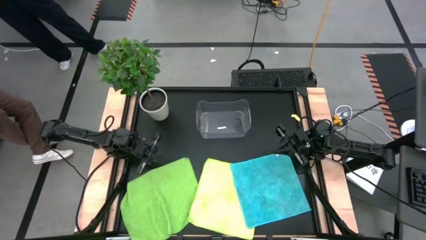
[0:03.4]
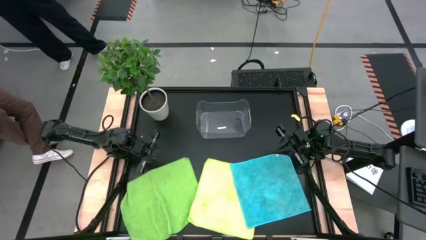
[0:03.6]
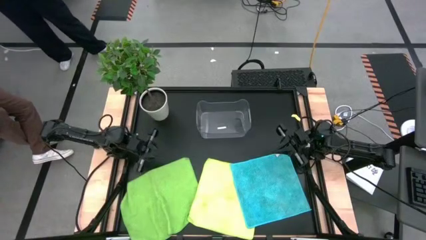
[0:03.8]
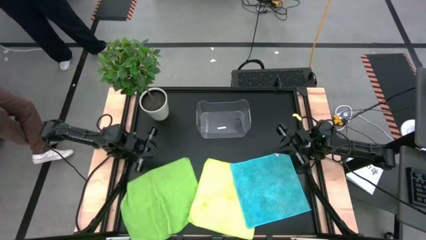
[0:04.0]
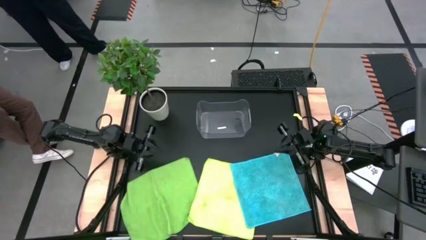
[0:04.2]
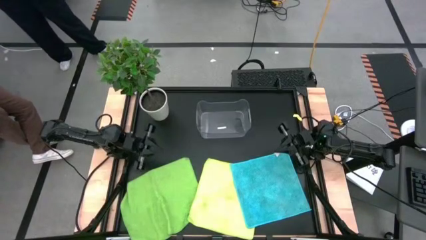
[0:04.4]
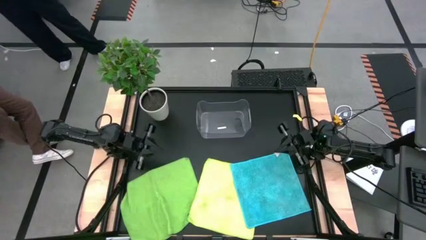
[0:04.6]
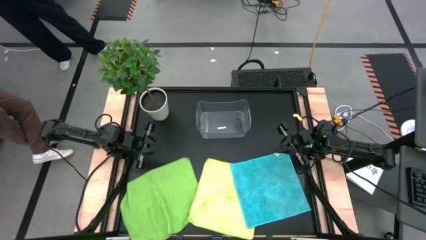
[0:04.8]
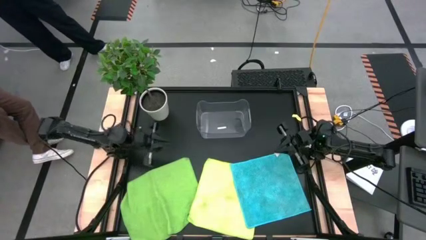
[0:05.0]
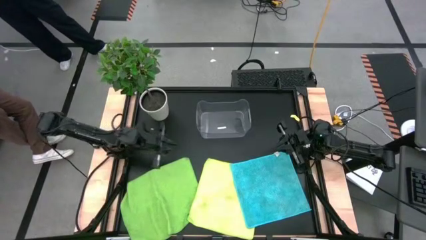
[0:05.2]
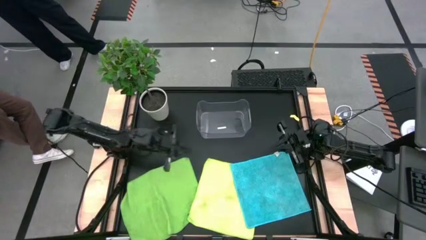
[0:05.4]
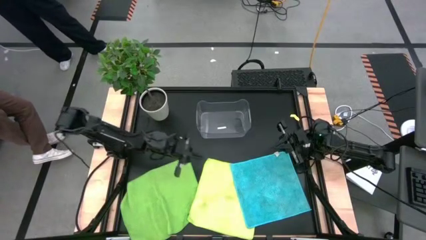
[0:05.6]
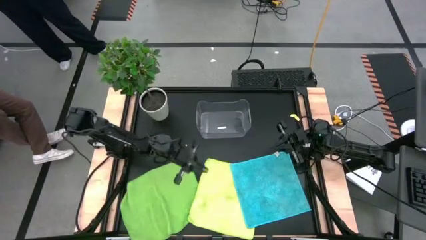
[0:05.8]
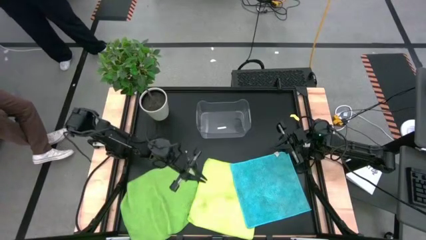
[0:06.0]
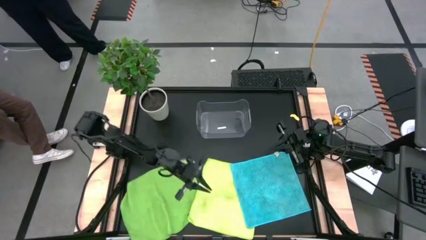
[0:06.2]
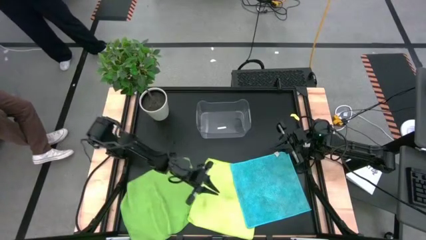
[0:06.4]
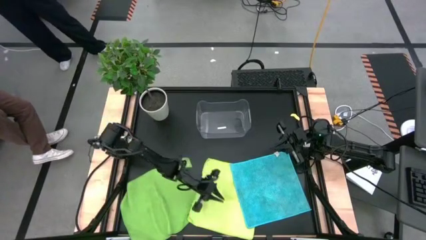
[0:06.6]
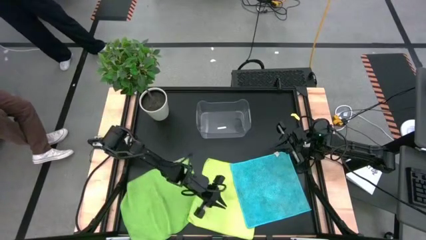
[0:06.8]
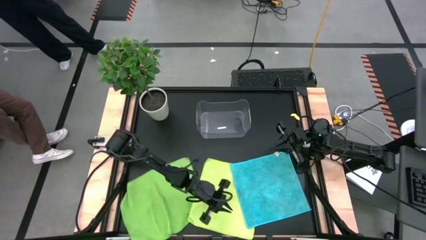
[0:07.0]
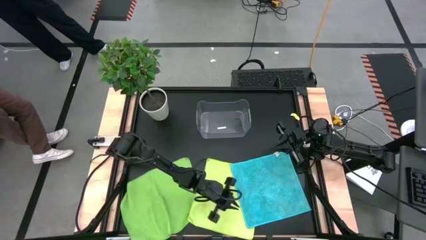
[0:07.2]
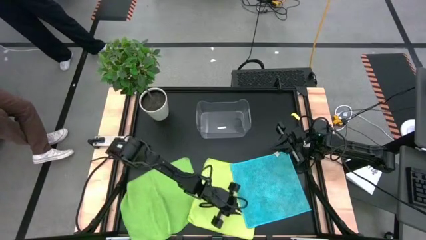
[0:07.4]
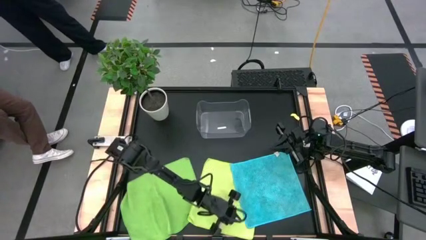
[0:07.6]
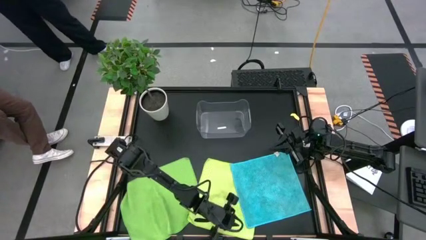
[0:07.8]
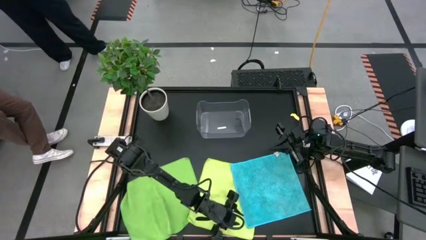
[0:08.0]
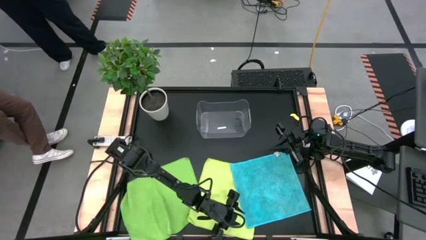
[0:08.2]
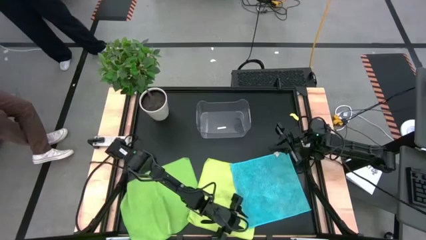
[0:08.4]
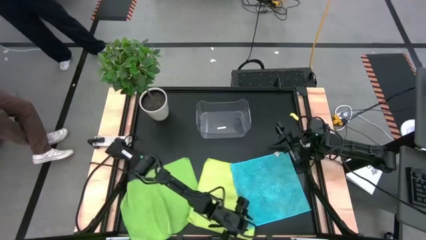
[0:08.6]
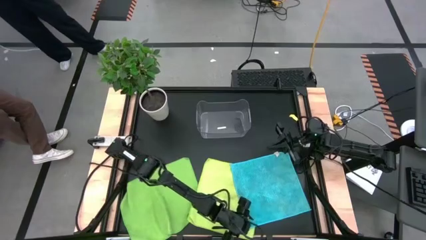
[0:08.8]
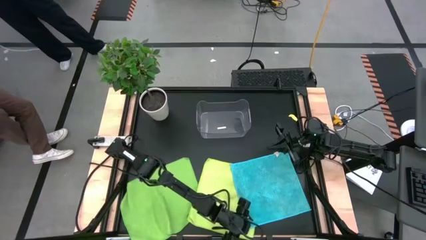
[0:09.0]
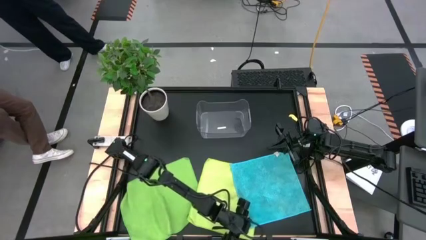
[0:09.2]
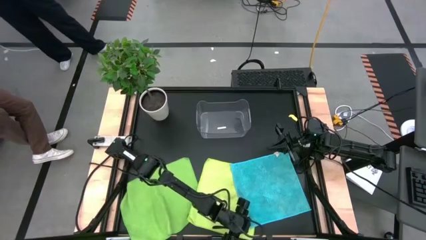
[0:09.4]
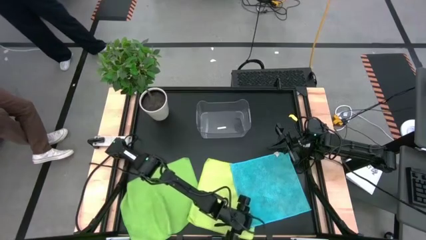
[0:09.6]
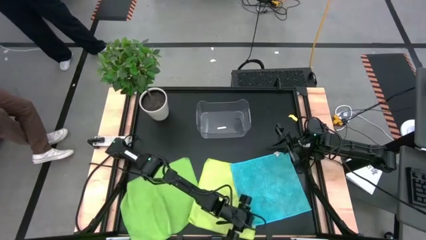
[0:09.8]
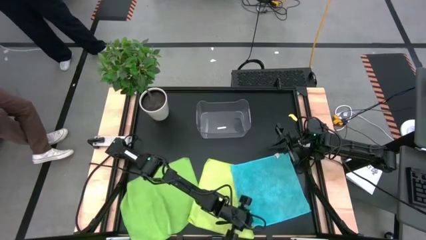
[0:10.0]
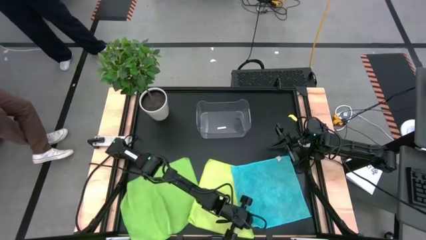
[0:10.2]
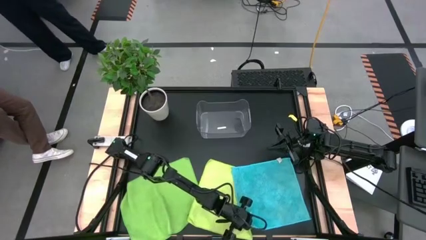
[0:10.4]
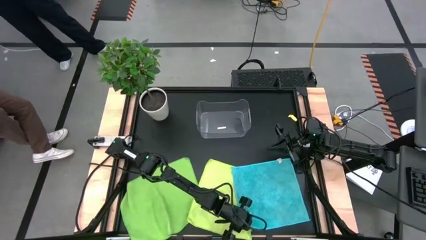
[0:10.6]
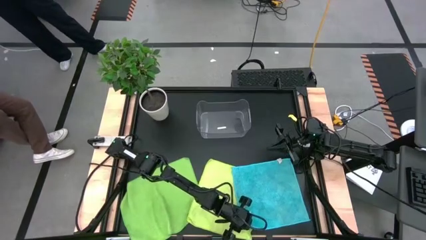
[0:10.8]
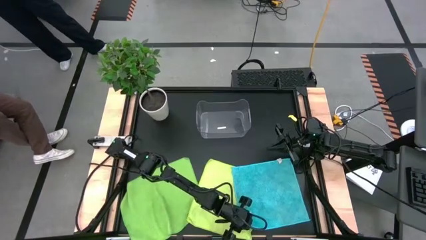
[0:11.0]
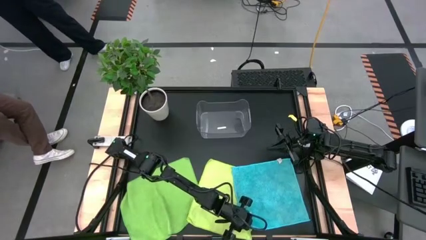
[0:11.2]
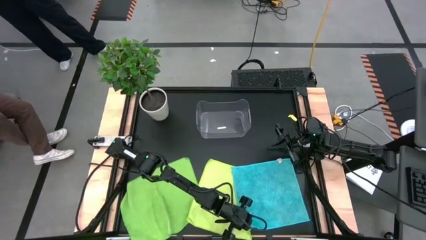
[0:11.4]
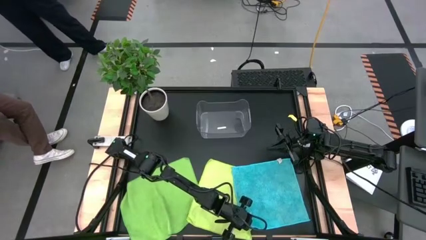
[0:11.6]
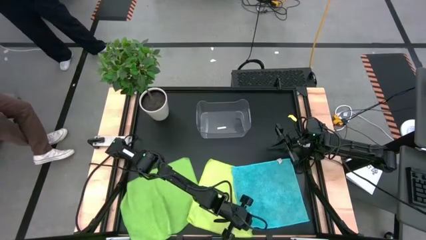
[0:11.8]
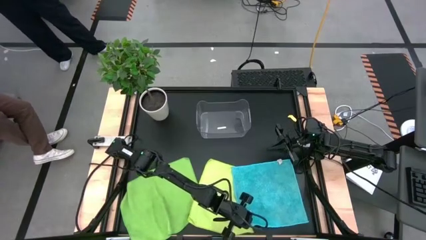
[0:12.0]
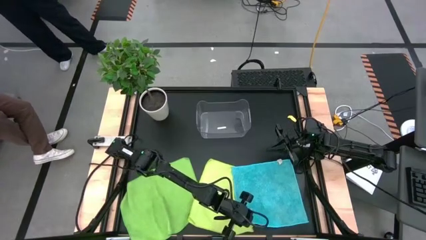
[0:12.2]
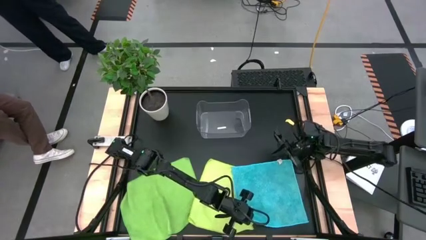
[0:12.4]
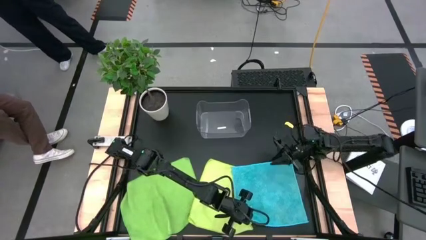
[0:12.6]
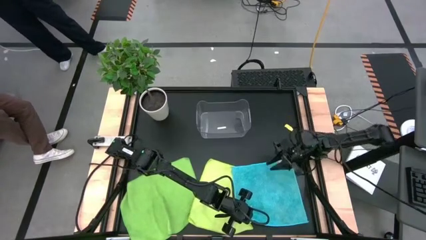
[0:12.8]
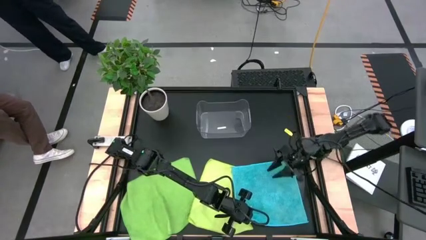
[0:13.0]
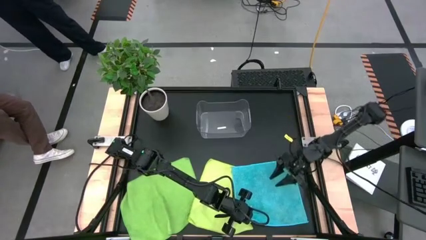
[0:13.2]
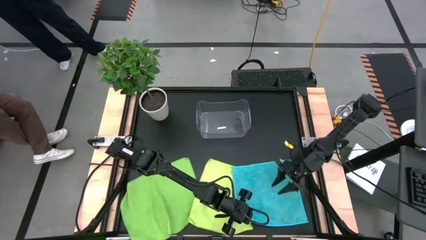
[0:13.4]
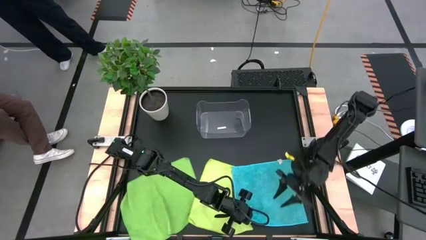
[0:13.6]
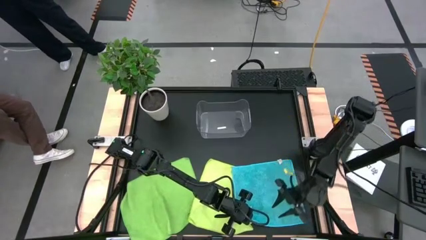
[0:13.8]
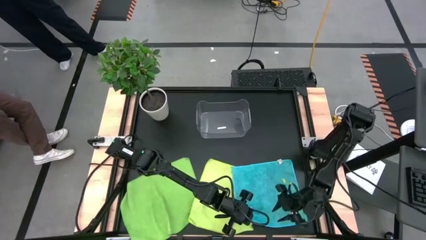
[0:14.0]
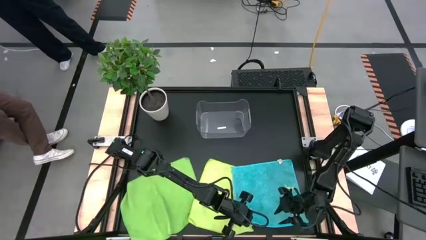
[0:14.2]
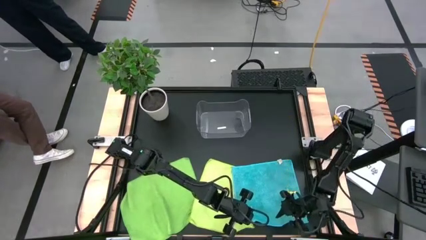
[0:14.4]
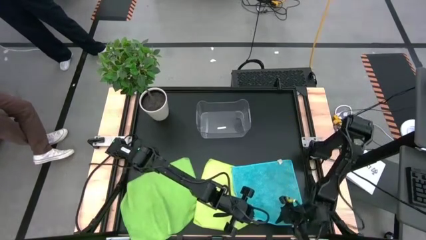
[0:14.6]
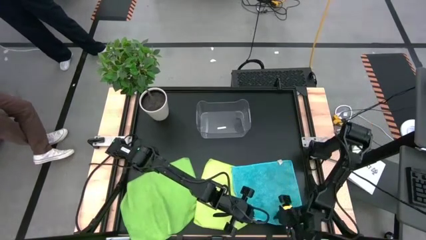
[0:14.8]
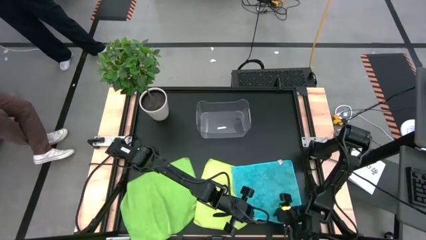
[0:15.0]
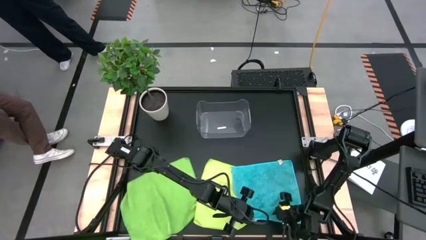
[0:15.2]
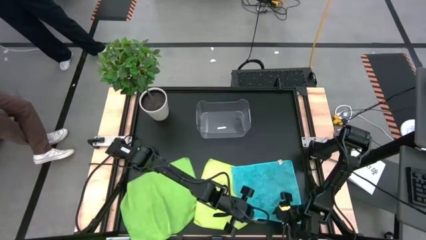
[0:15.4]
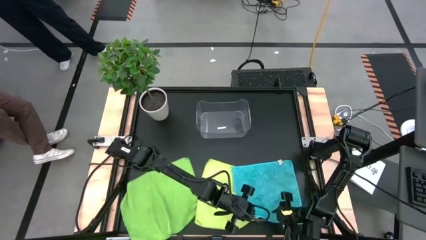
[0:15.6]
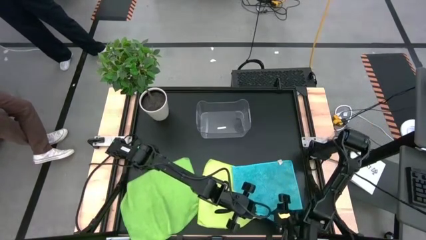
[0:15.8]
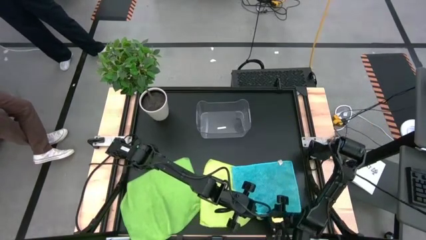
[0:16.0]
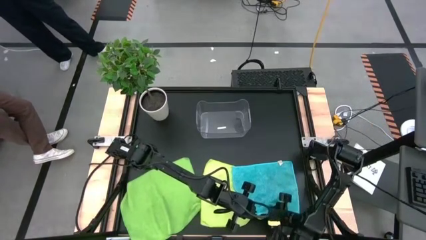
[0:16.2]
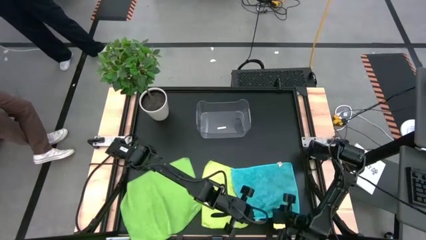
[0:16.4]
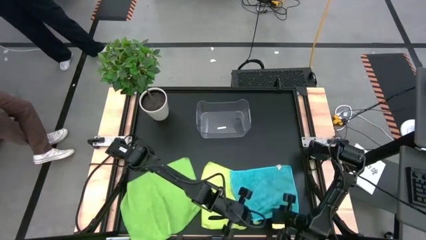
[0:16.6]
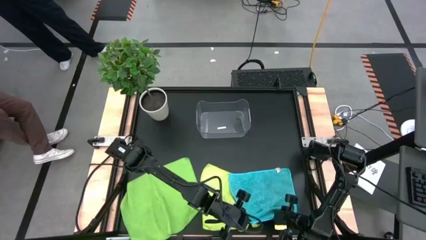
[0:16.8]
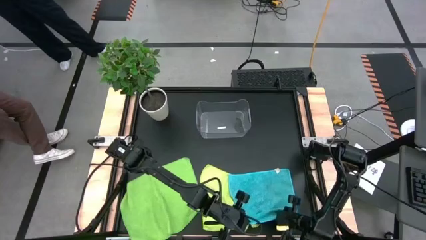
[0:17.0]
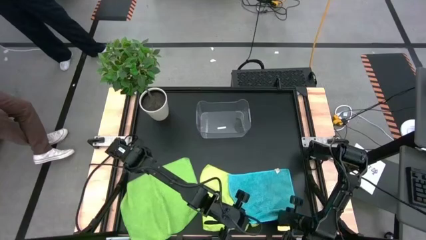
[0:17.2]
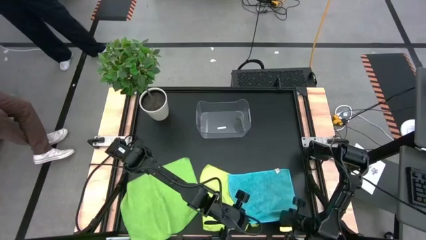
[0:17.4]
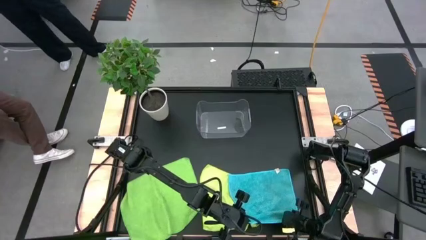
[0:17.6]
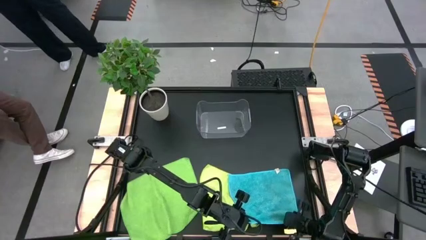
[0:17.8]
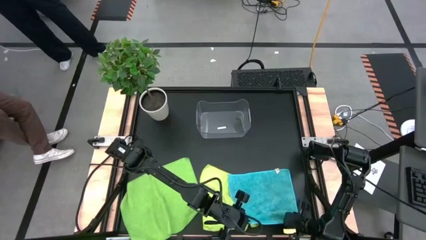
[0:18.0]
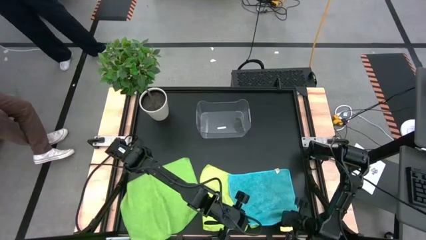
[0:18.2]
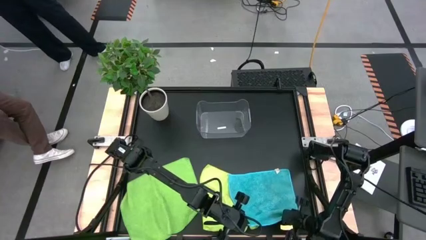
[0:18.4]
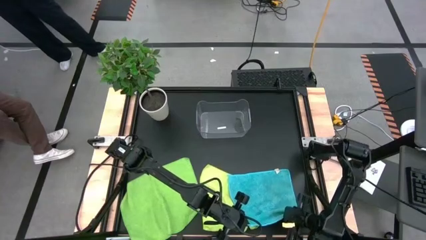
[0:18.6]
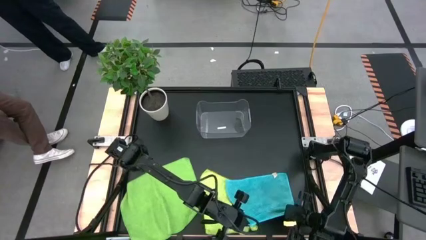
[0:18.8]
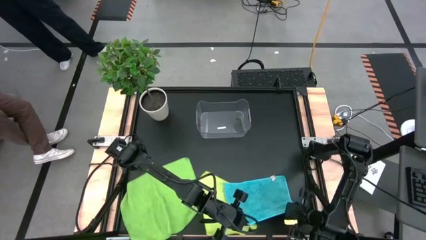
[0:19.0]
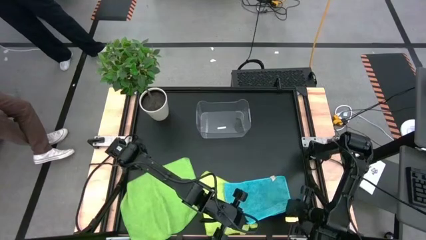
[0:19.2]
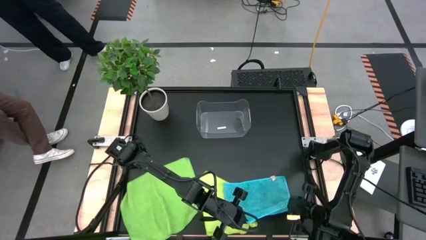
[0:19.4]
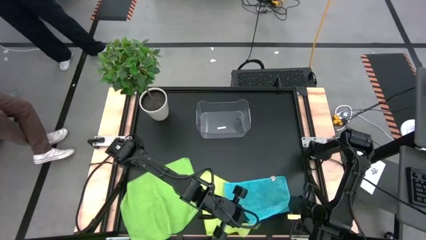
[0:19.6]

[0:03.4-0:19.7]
Task: Fold microfiber towels
Fold the blue towel
